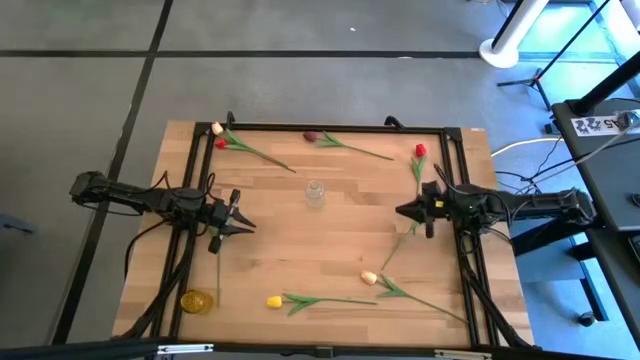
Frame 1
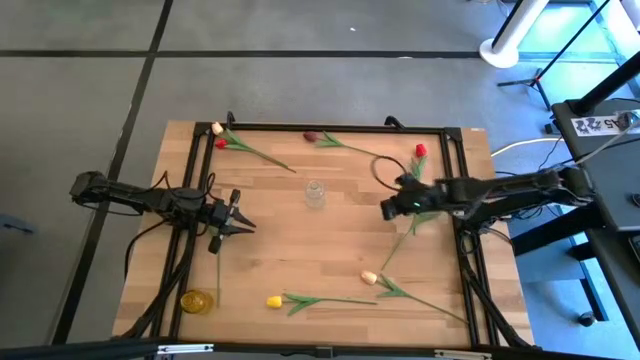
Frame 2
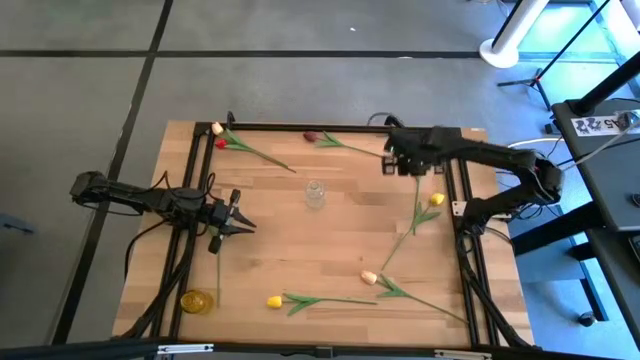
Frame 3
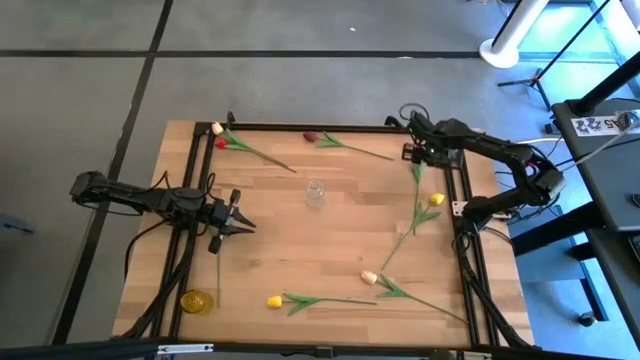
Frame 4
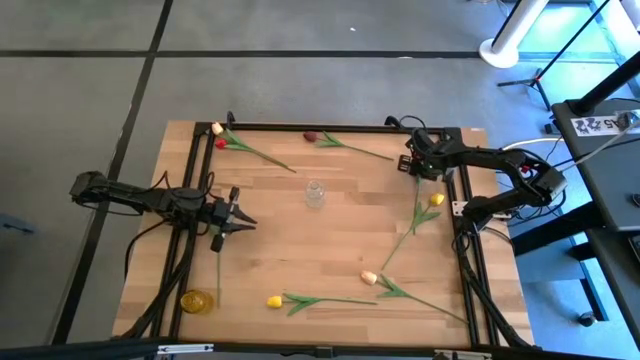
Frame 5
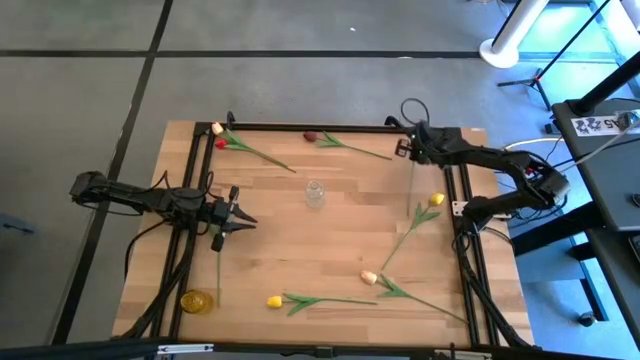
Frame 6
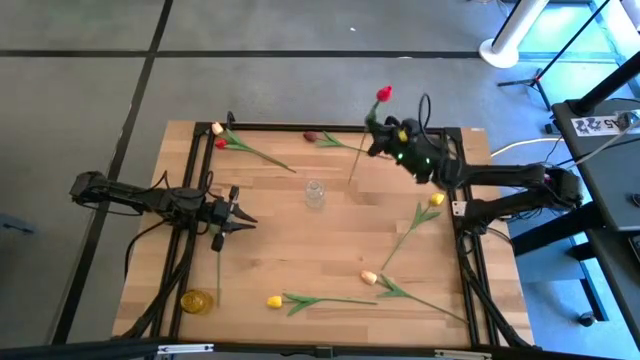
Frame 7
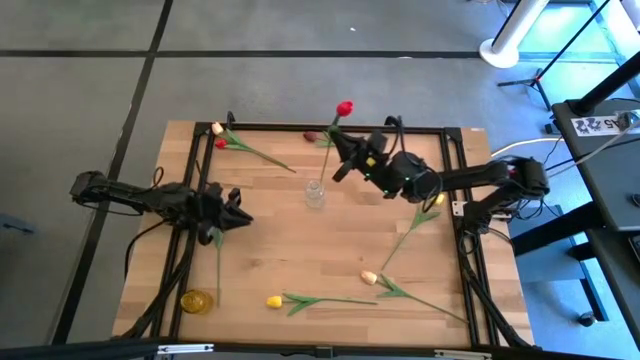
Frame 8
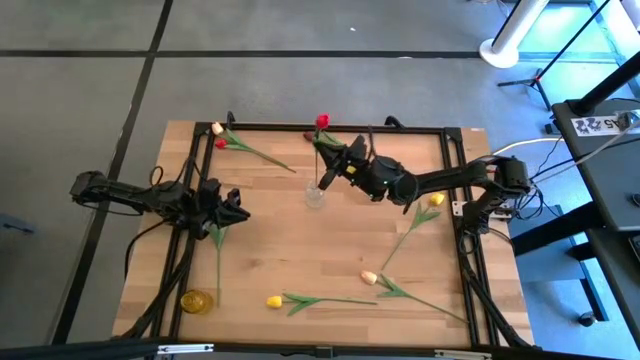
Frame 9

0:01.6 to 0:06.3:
Task: Sort flowers into vase by color
Put the right red flower into the transparent vase

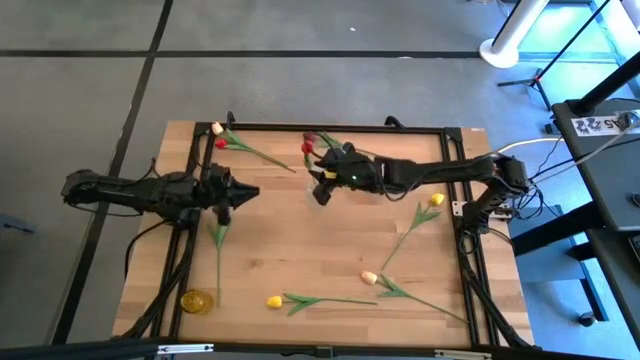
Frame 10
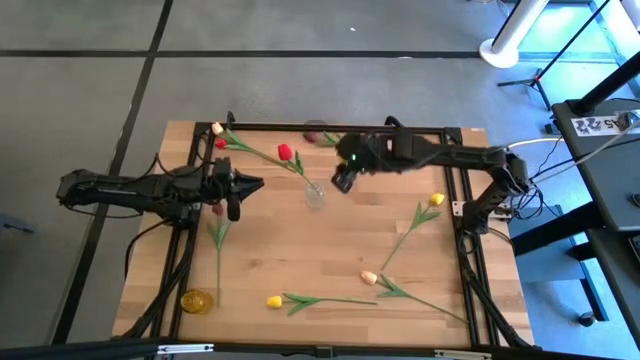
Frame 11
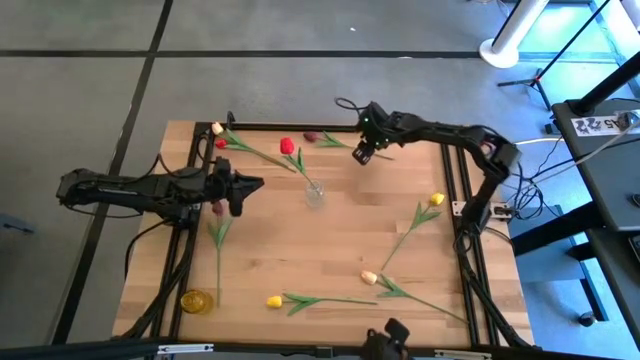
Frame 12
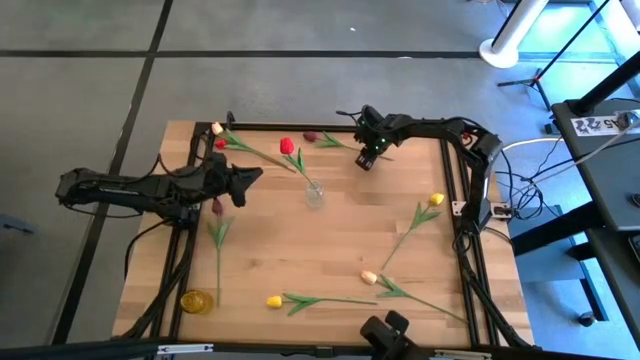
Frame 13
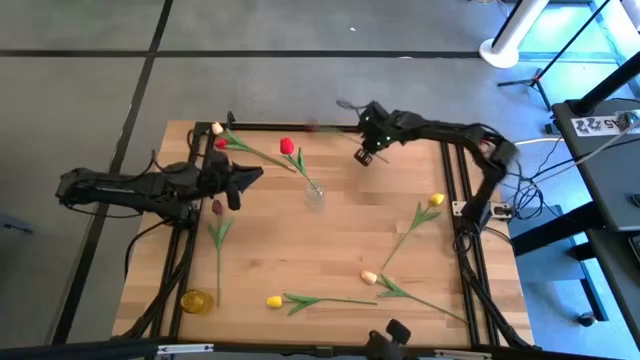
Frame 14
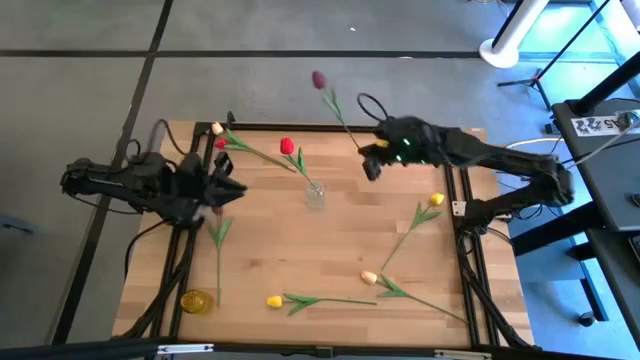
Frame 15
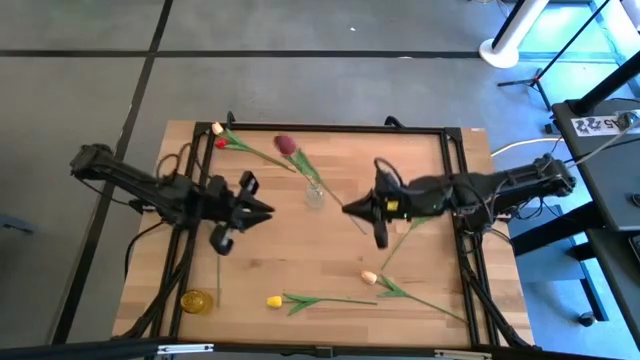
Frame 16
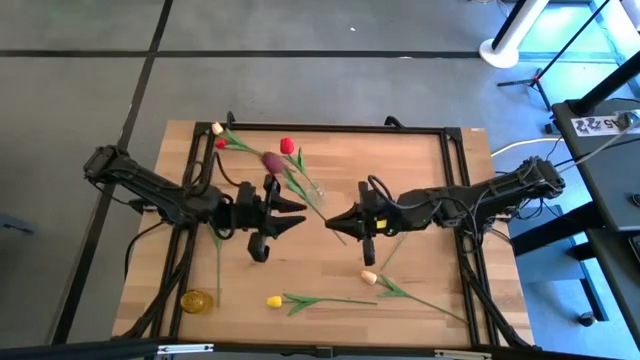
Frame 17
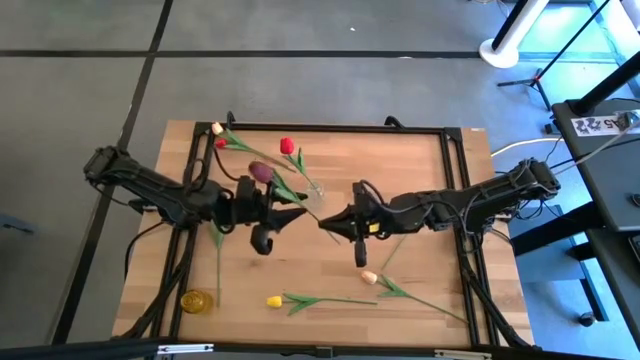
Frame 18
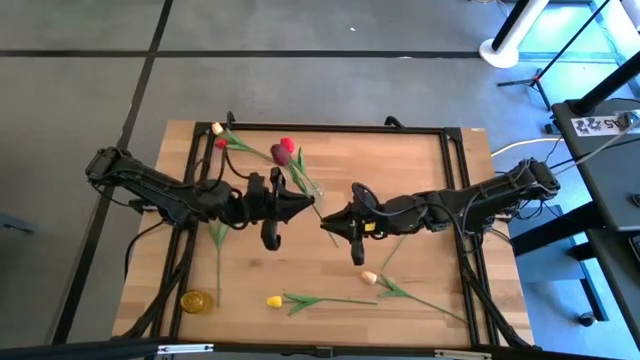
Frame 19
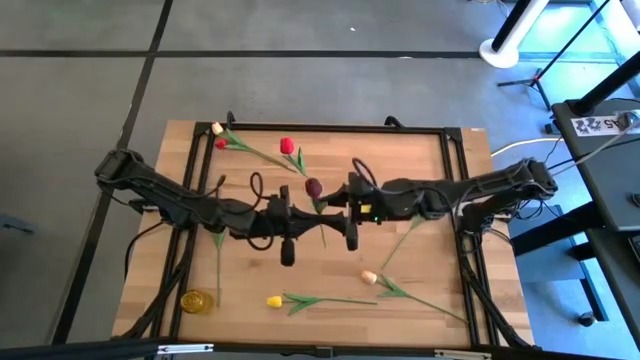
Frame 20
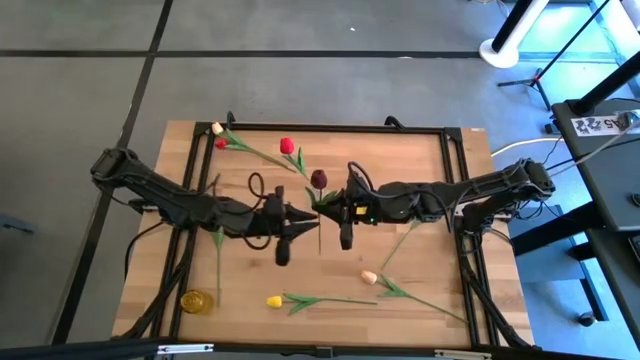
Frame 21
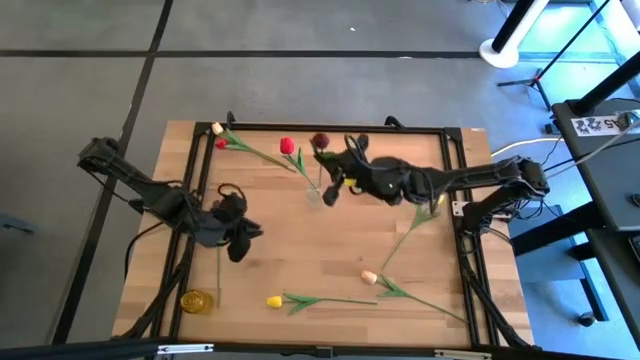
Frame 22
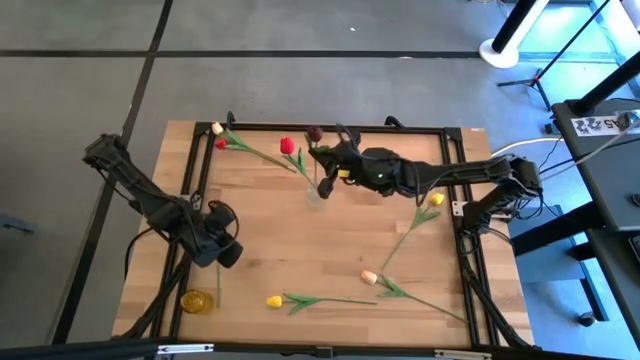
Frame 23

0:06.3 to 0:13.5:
Put the top dark purple flower into the transparent vase

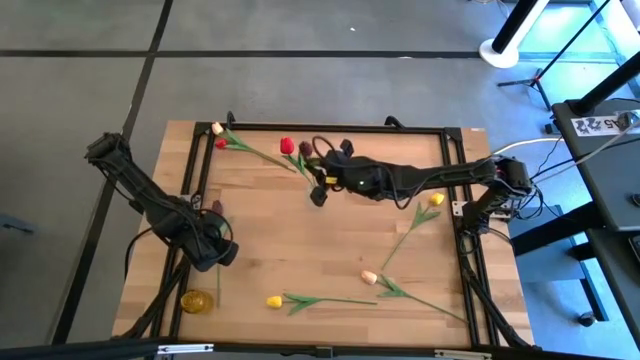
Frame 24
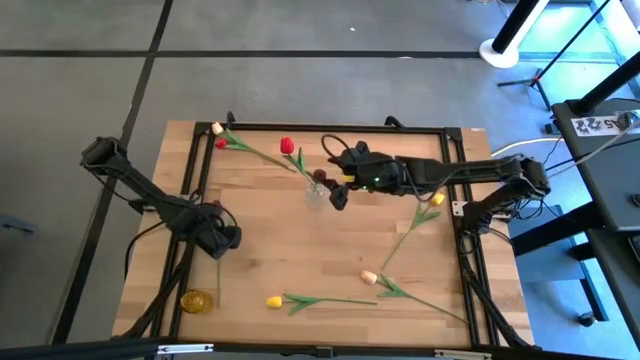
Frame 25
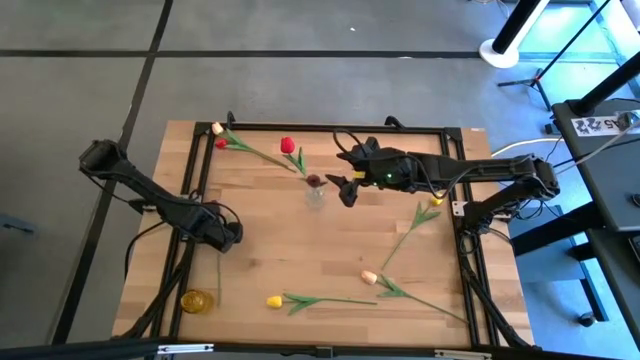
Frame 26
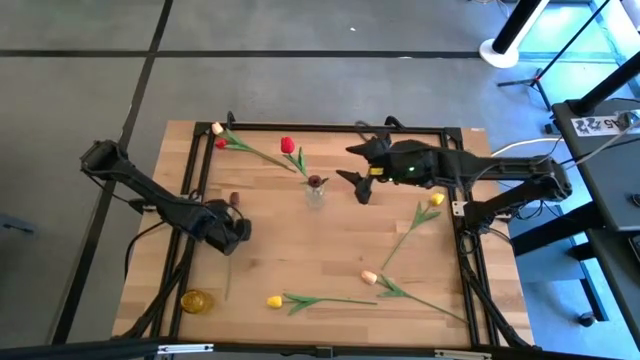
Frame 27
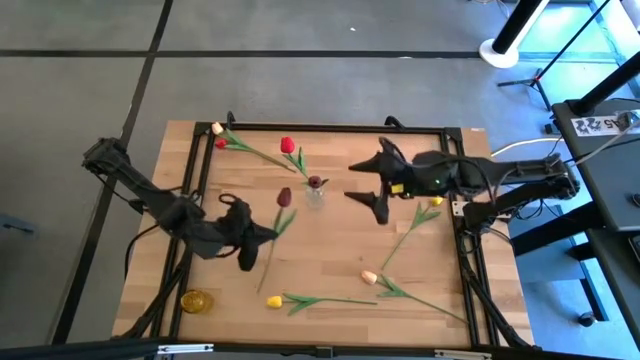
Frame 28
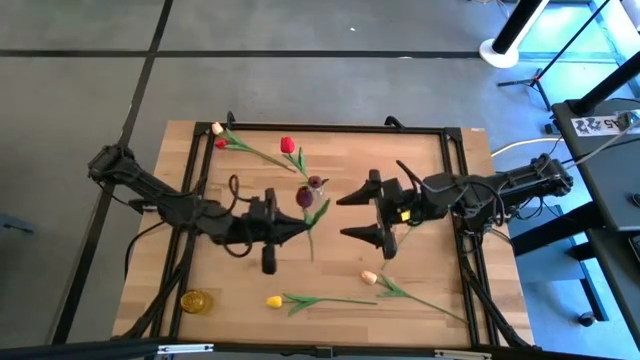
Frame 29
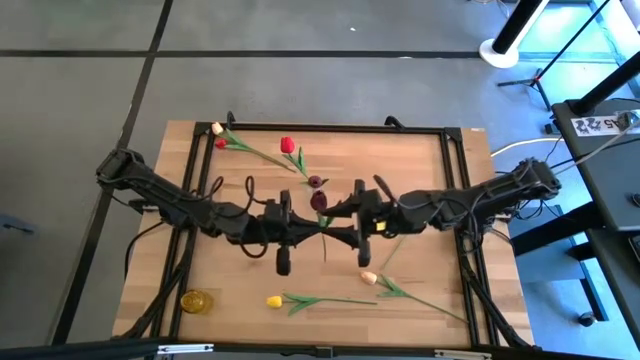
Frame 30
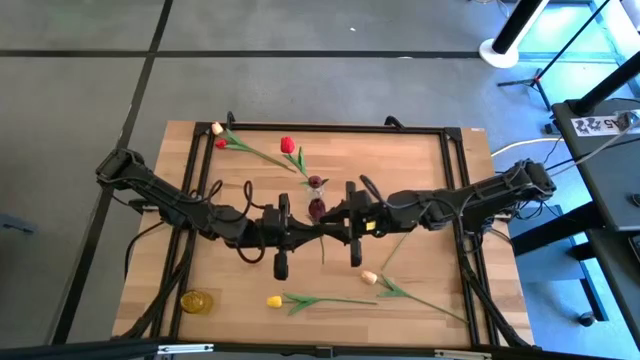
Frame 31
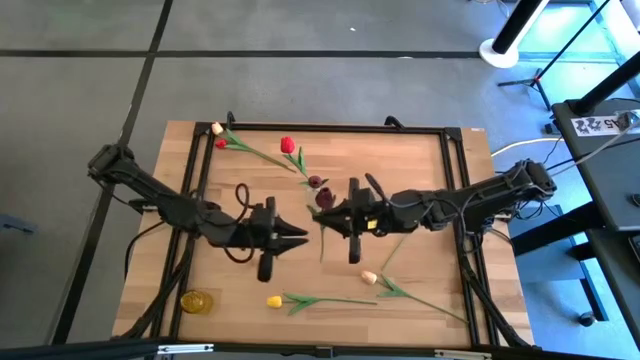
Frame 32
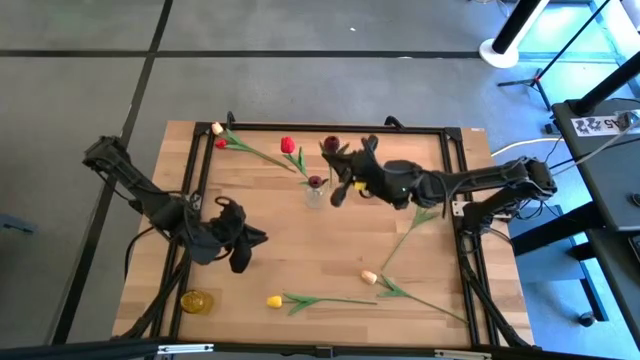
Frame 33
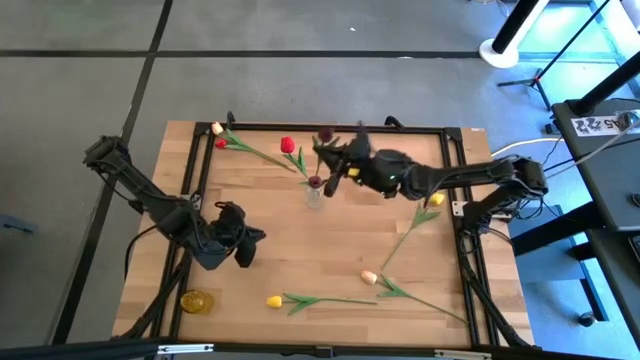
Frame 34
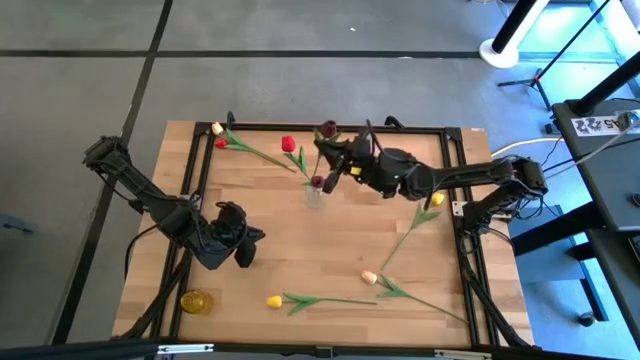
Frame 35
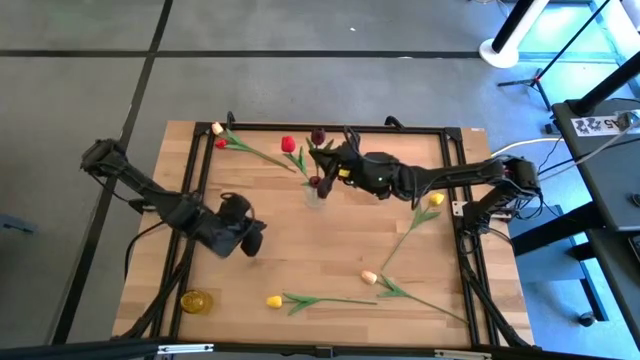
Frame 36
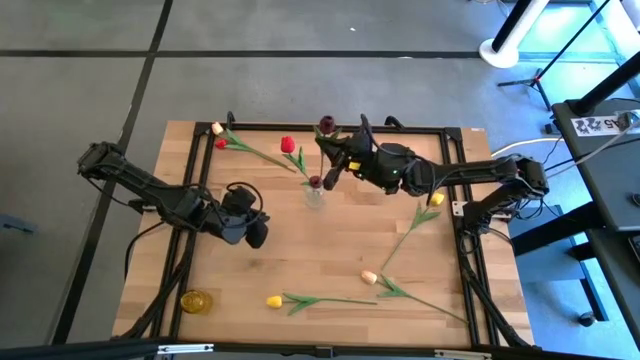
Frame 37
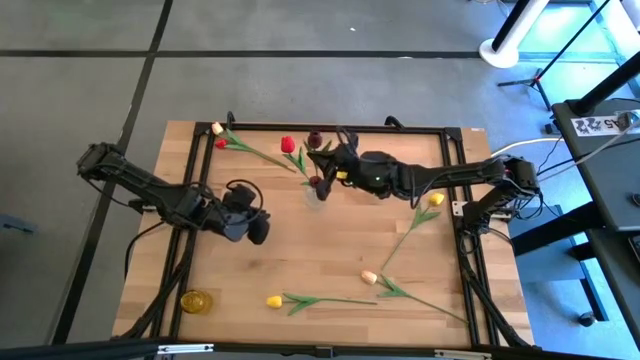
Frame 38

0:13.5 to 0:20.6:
Put the dark purple flower into the transparent vase

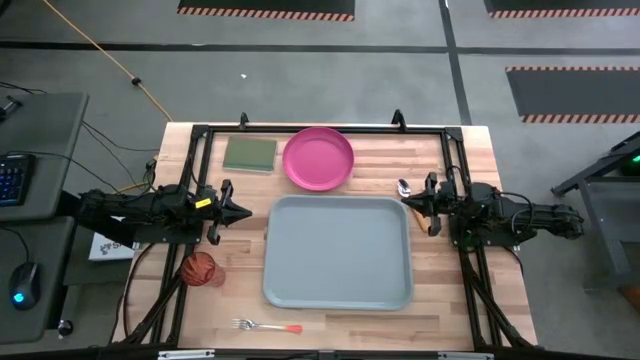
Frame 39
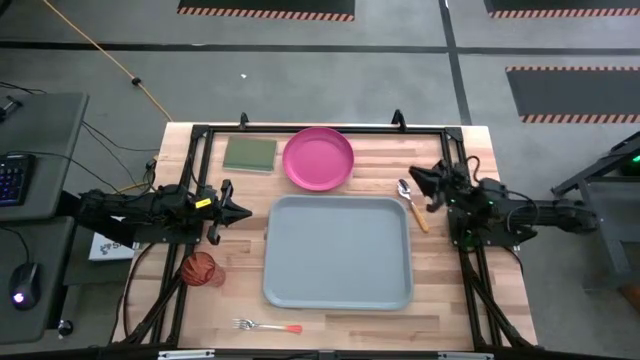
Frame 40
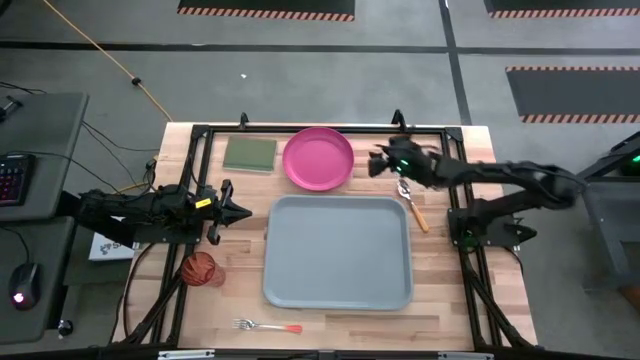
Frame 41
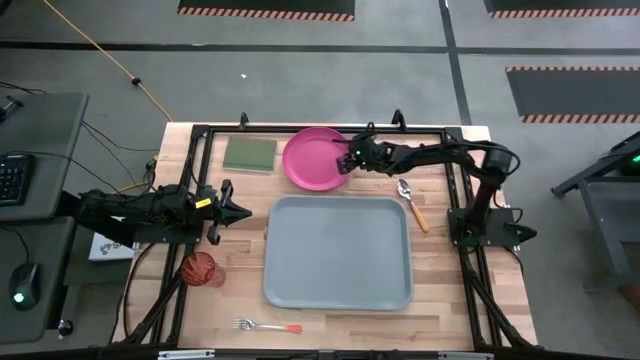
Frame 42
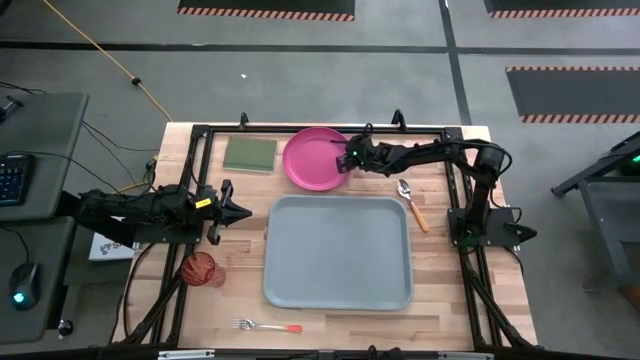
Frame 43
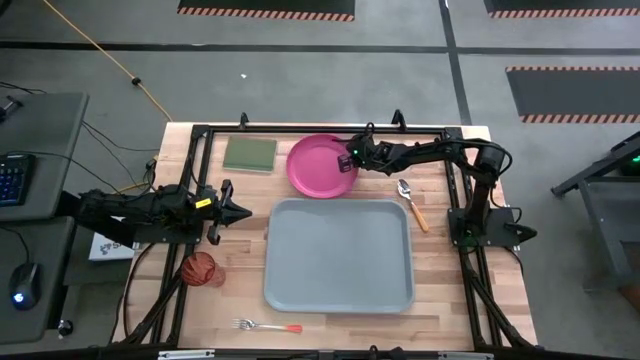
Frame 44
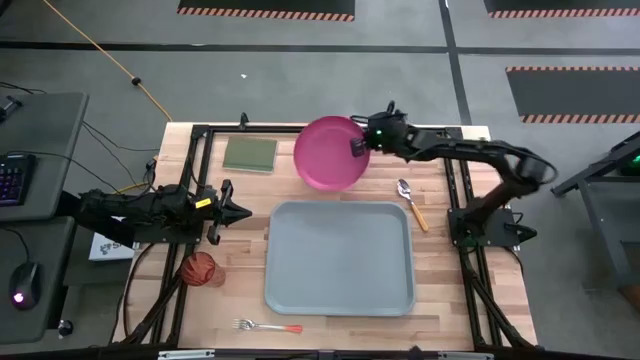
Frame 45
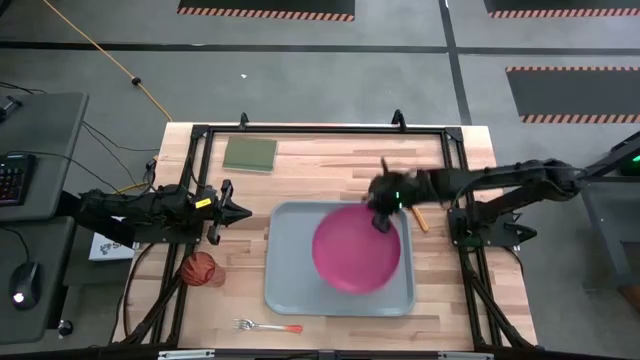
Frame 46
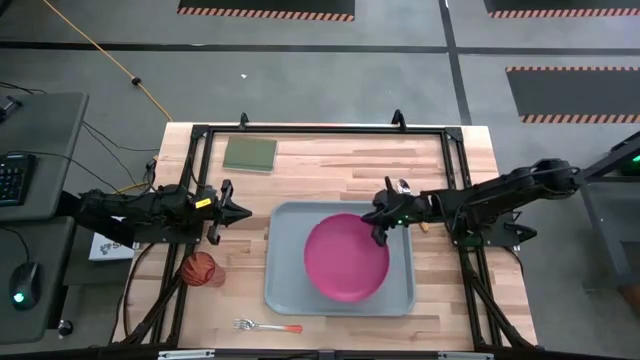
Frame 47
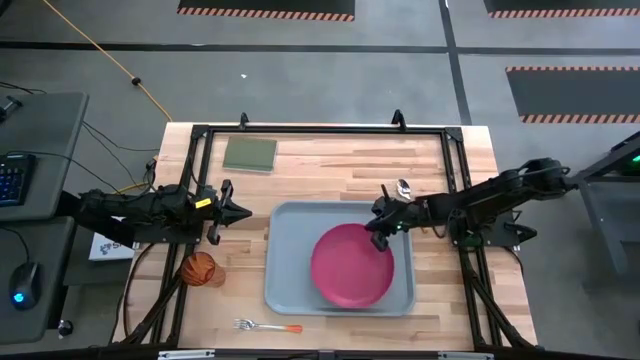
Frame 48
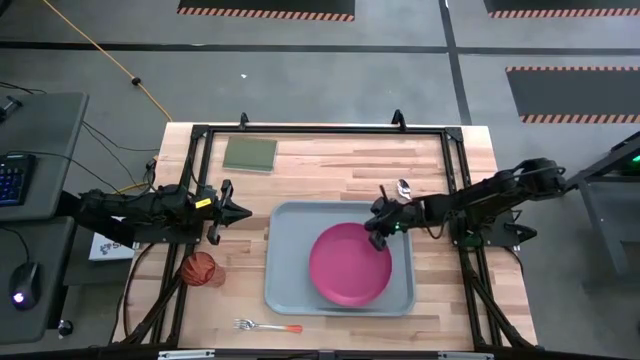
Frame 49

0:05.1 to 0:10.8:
Task: Pick and place plate/cup/fork/spoon on tray
Put the pink plate on the gray tray
